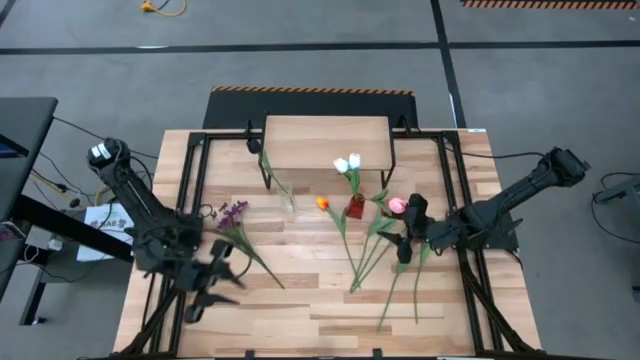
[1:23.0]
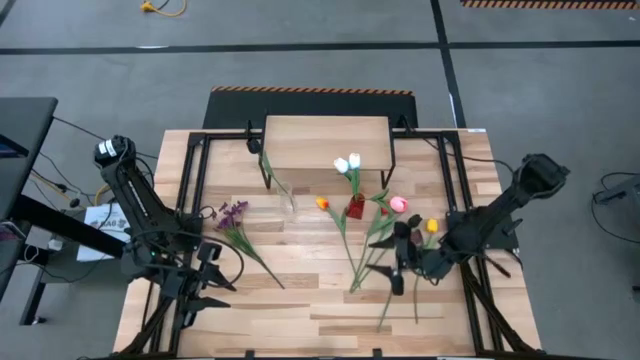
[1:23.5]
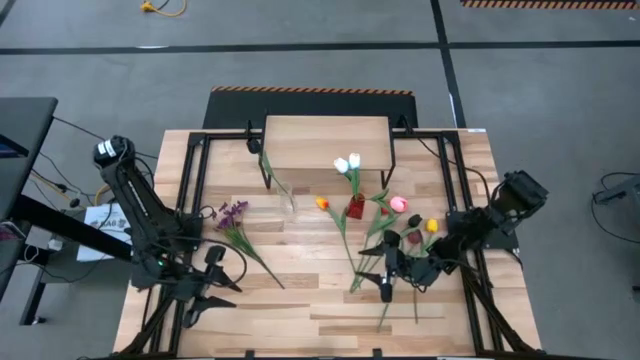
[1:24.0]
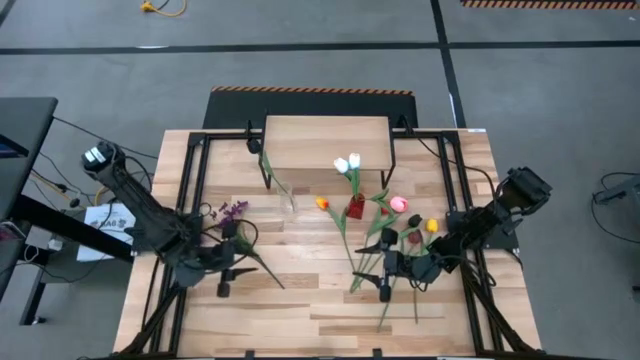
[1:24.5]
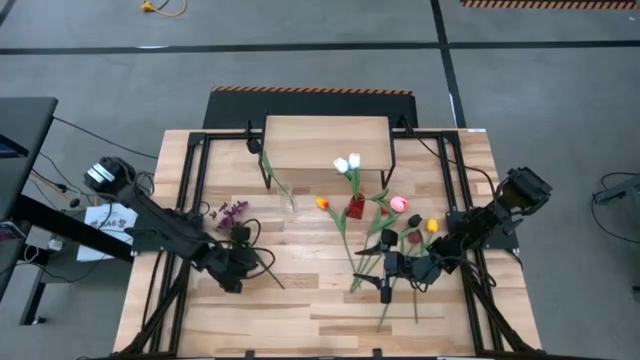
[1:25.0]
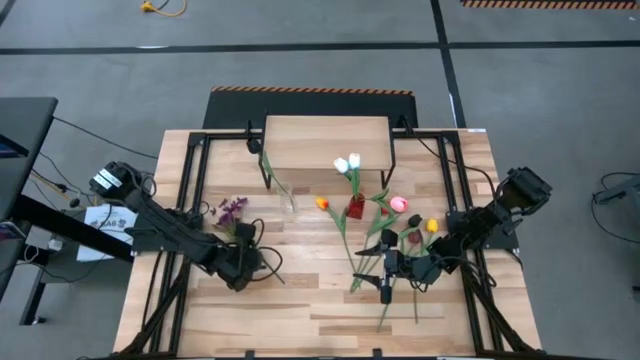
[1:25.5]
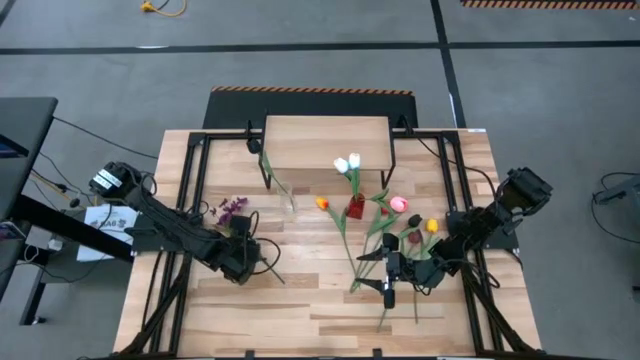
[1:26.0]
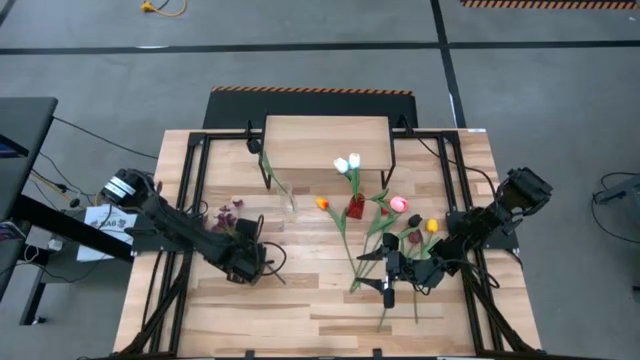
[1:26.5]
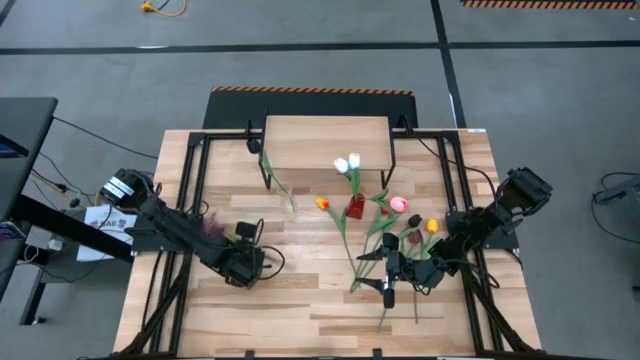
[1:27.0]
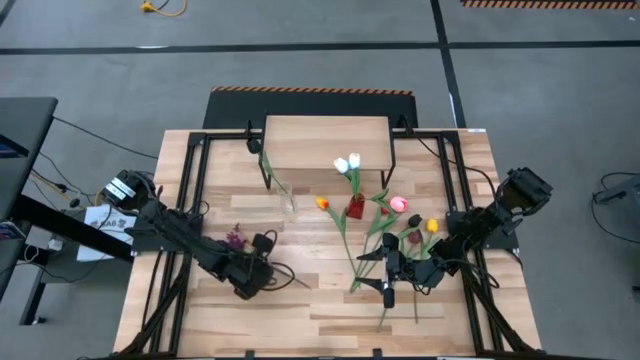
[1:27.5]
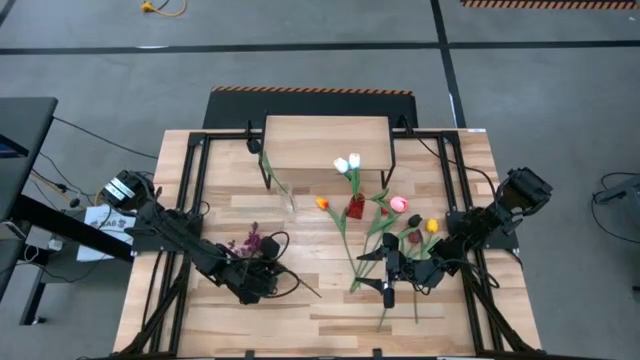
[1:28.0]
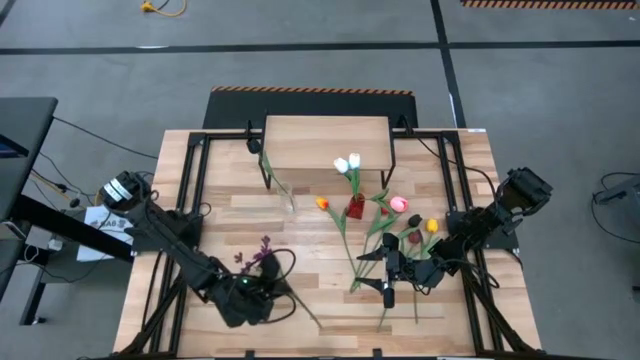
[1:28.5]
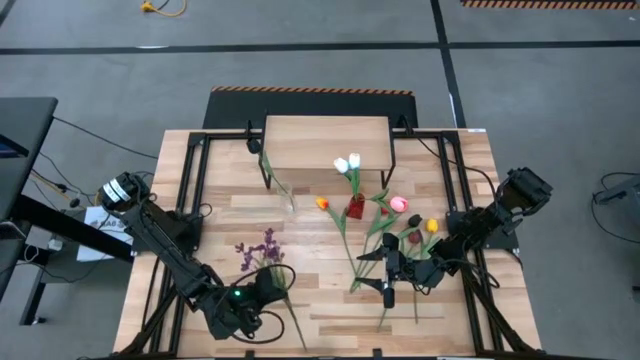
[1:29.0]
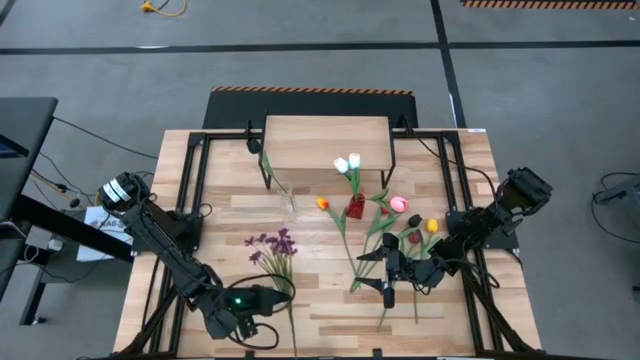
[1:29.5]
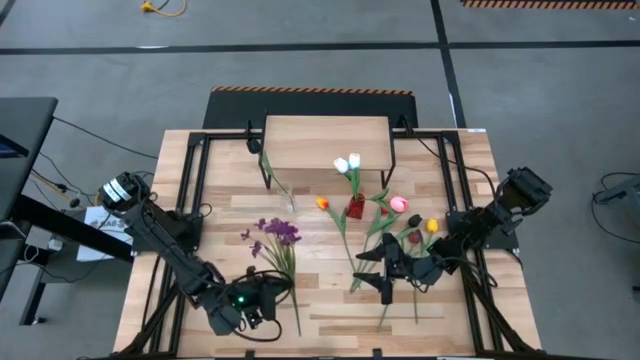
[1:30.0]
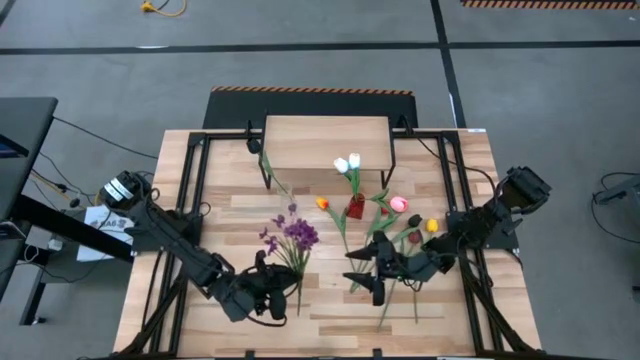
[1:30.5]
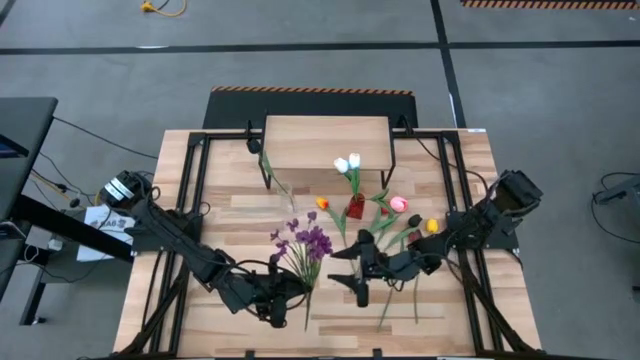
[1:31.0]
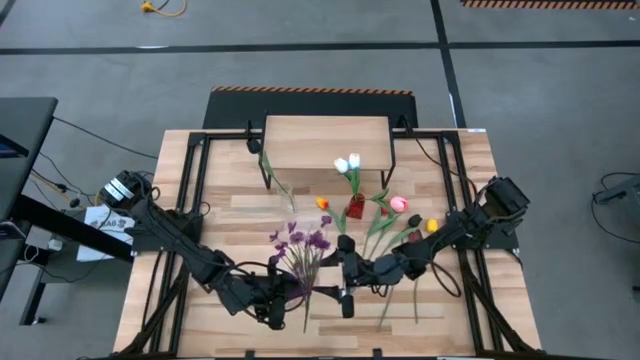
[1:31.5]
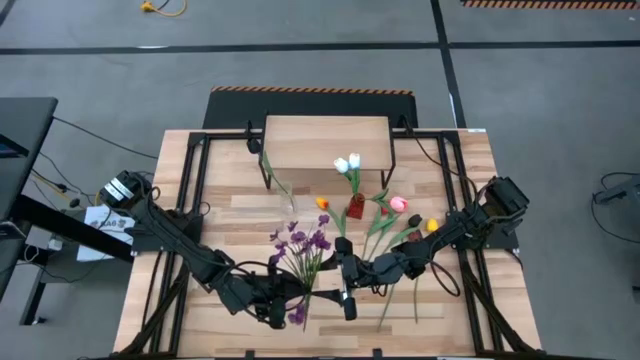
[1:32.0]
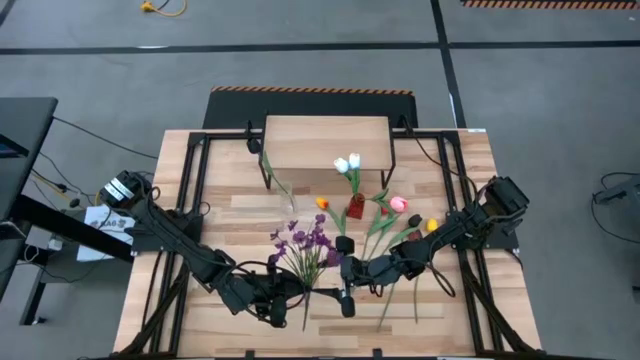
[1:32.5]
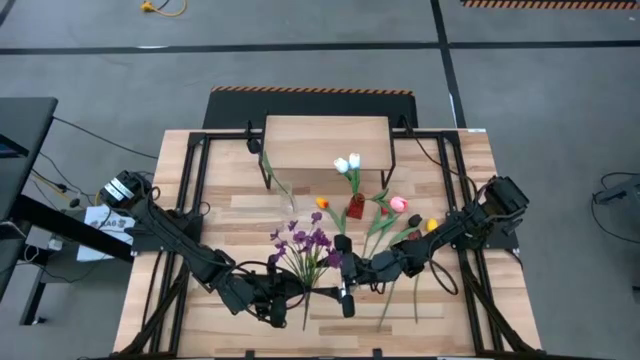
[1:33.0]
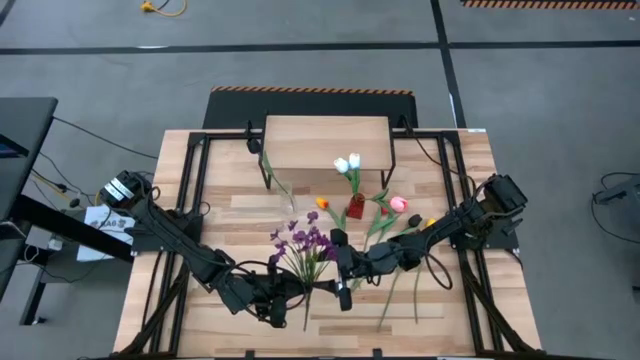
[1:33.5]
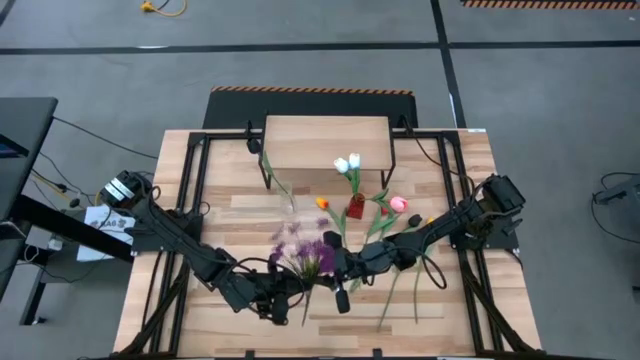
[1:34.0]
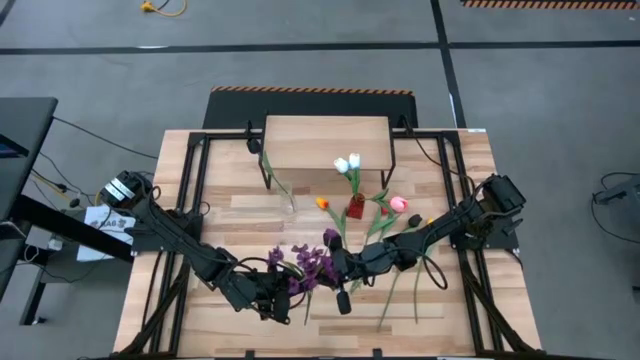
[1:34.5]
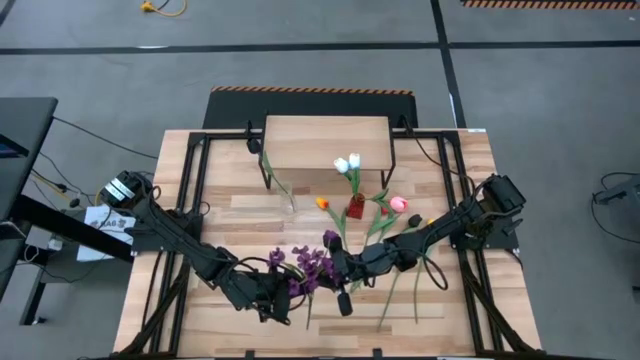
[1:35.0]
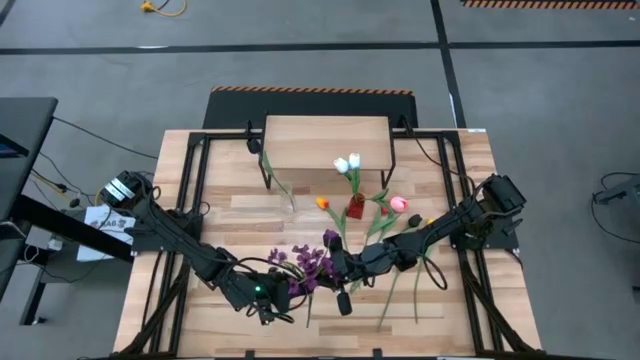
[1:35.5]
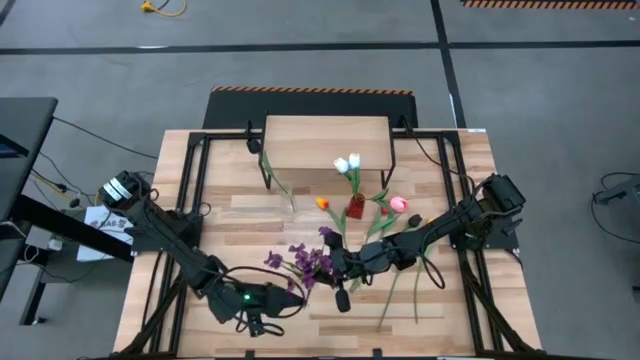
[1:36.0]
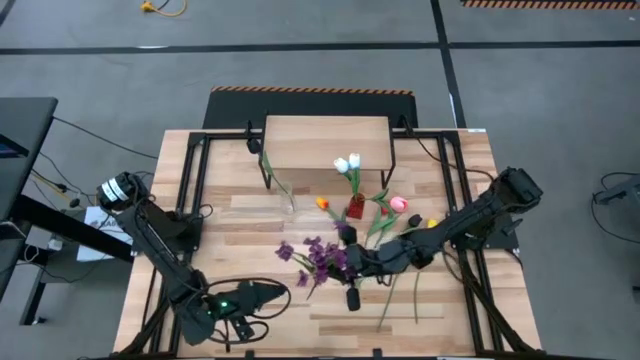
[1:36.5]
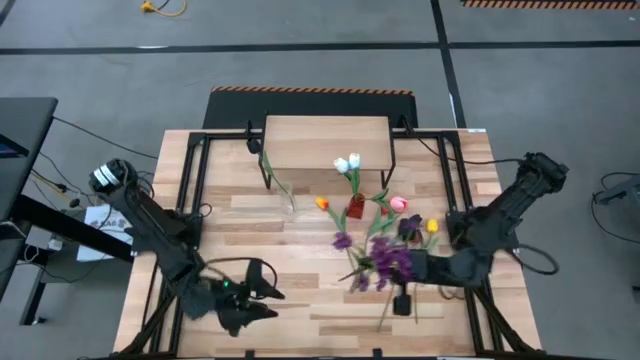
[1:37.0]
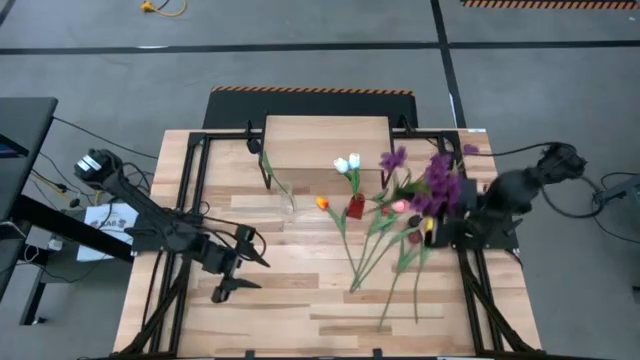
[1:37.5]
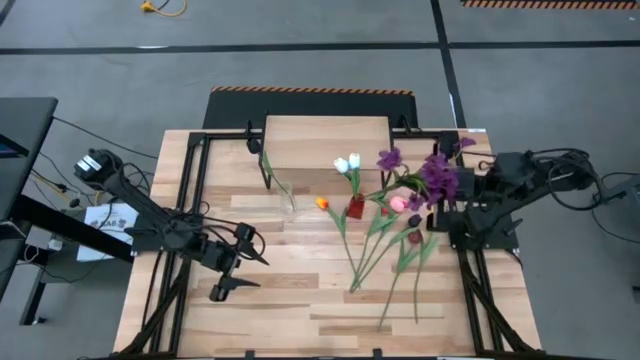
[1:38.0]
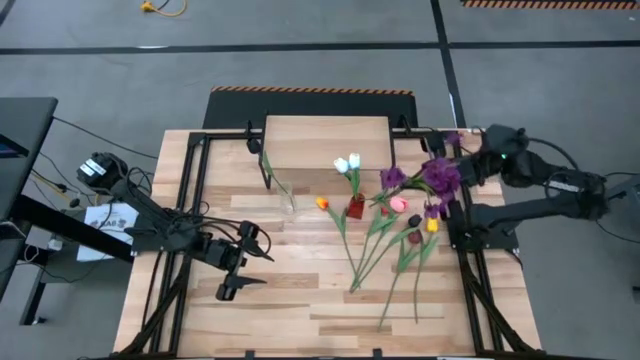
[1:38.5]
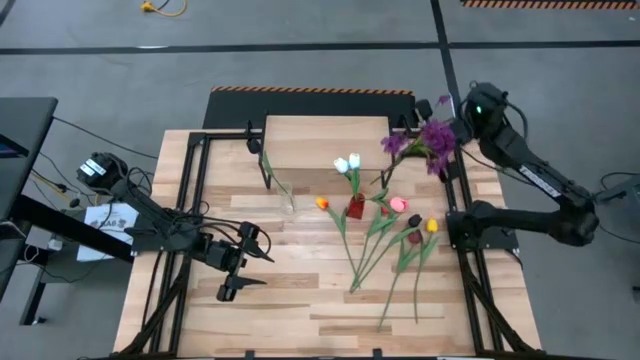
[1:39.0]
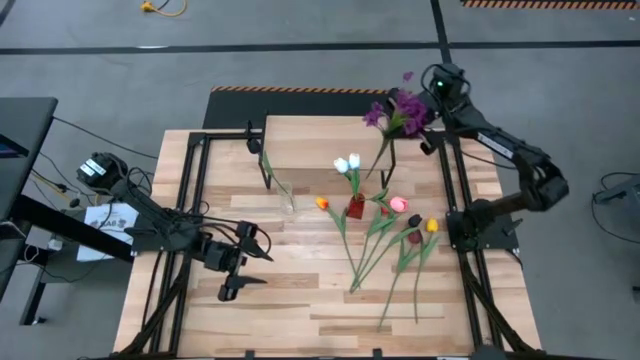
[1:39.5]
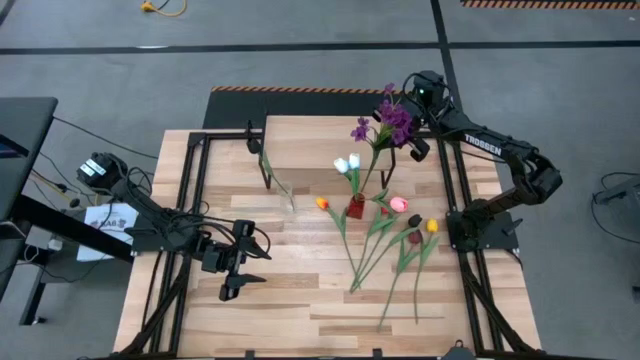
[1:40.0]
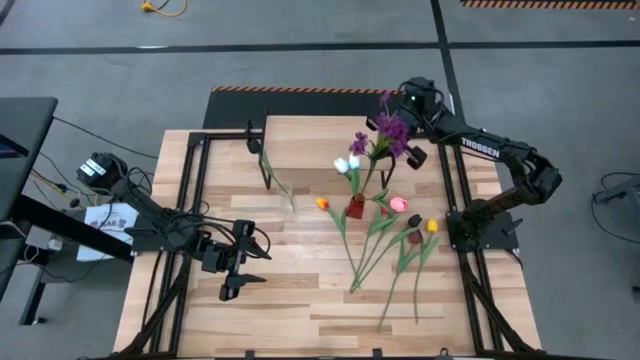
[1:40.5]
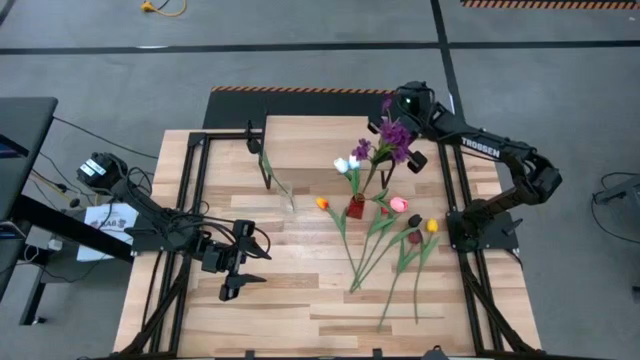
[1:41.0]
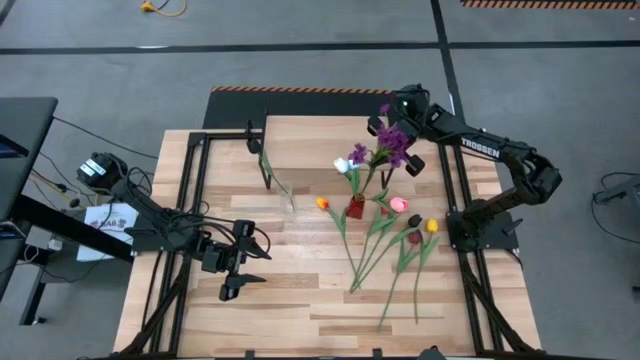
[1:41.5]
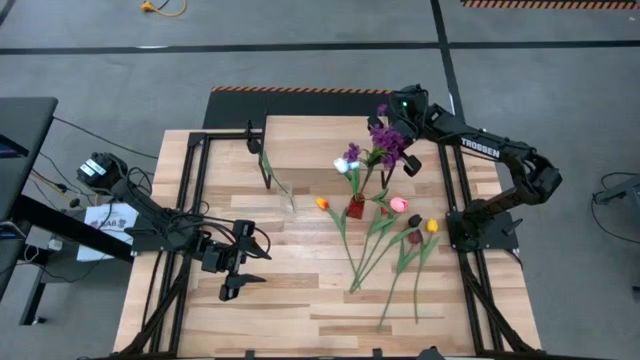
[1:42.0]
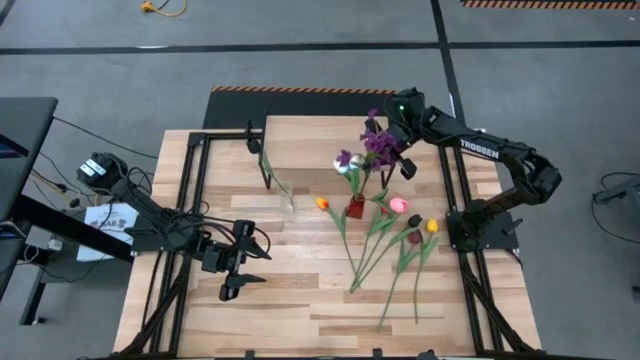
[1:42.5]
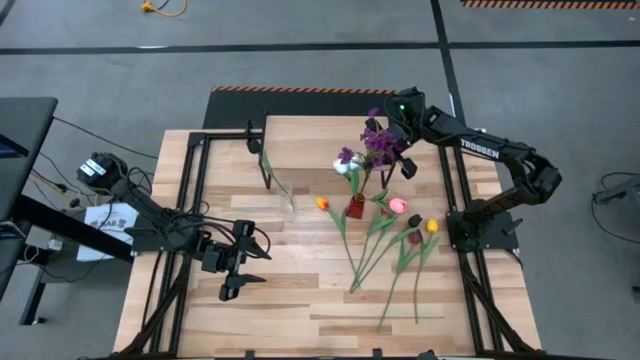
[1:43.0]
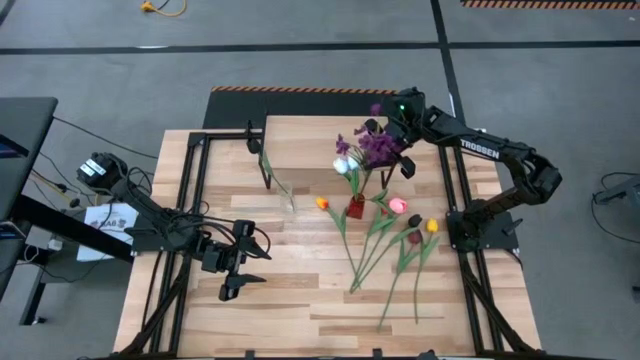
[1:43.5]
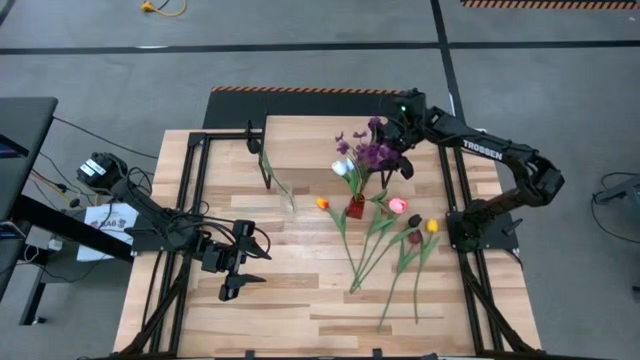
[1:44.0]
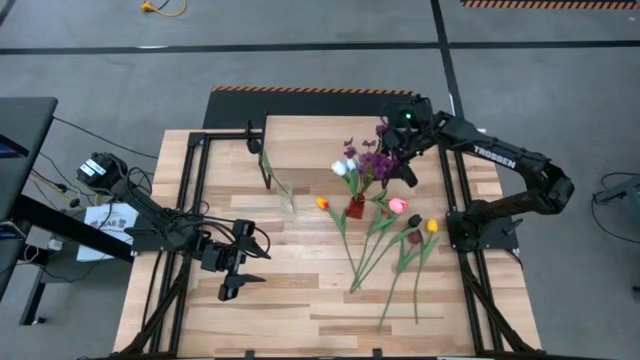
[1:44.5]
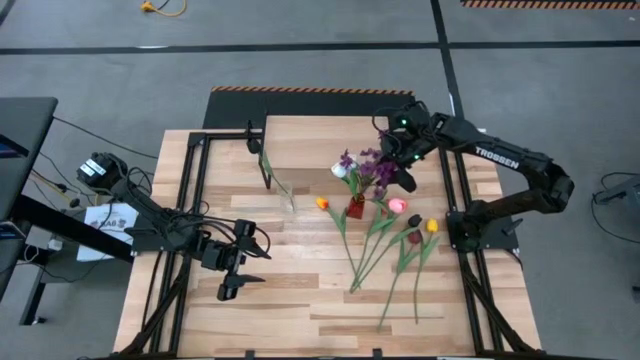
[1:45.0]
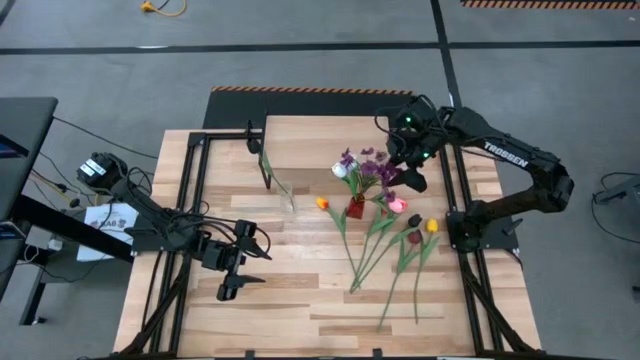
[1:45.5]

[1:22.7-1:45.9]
Task: Pick and place flowers into a vace then onto a shelf
Put the violet flowers into the red vase
